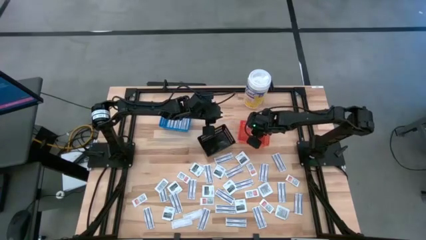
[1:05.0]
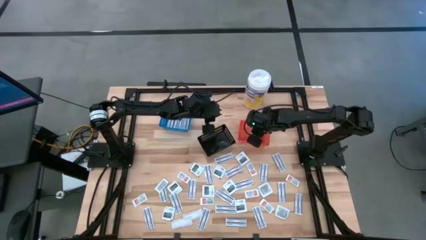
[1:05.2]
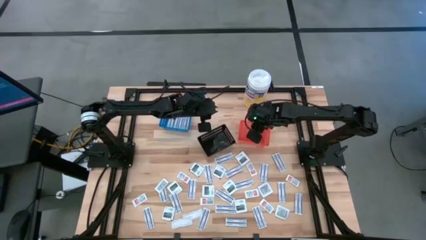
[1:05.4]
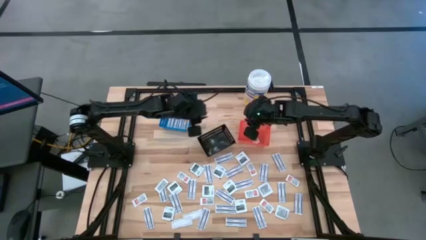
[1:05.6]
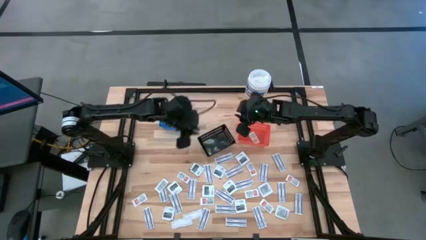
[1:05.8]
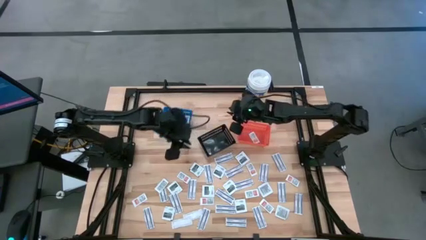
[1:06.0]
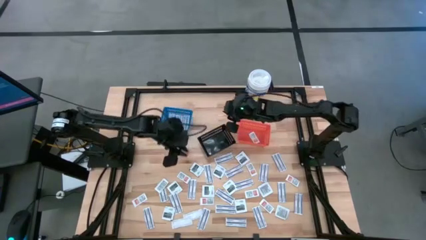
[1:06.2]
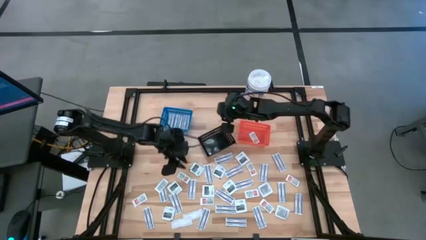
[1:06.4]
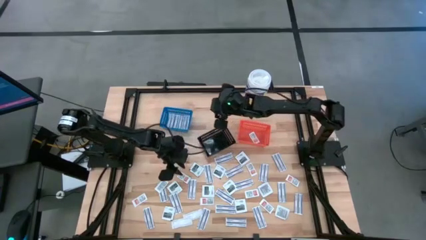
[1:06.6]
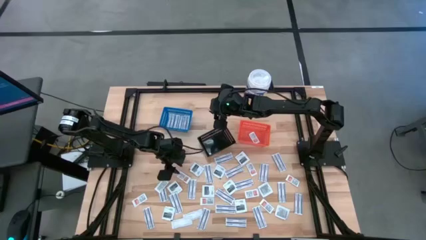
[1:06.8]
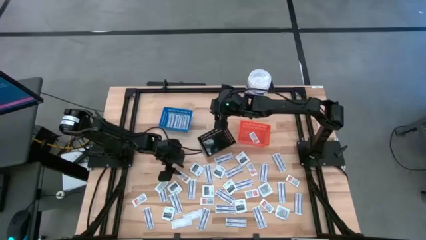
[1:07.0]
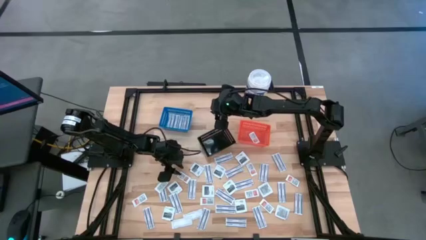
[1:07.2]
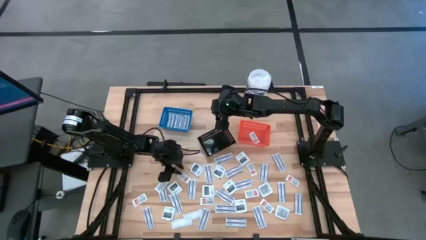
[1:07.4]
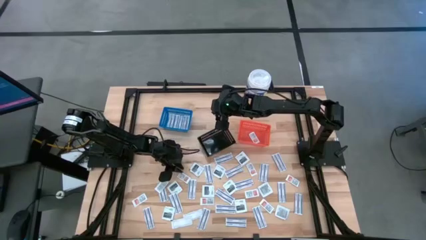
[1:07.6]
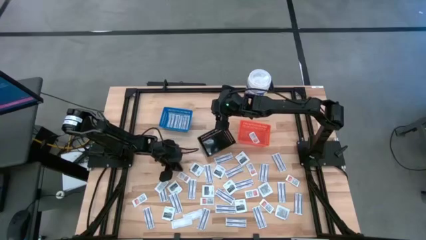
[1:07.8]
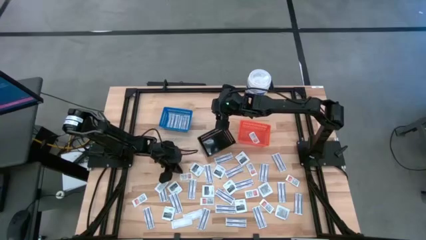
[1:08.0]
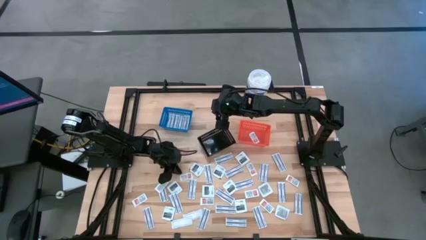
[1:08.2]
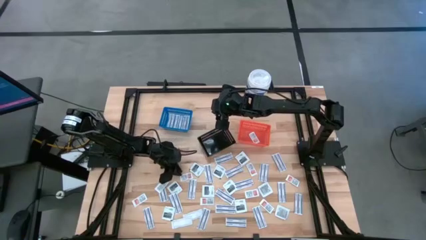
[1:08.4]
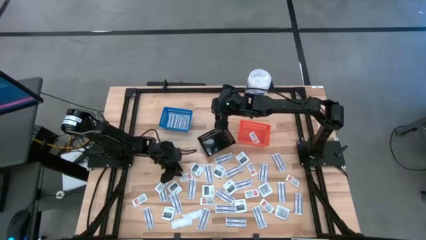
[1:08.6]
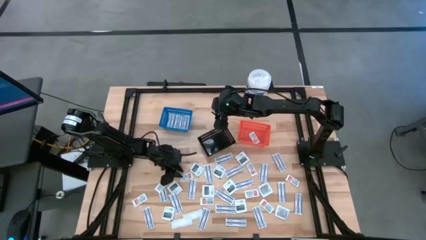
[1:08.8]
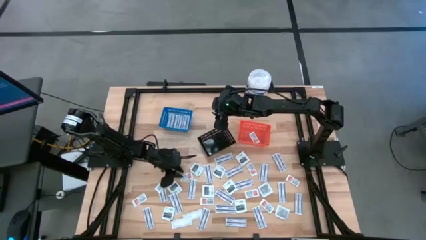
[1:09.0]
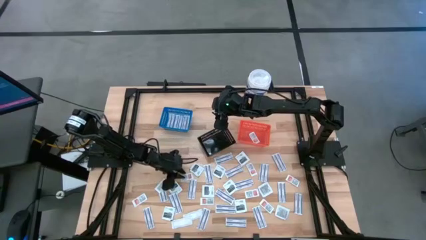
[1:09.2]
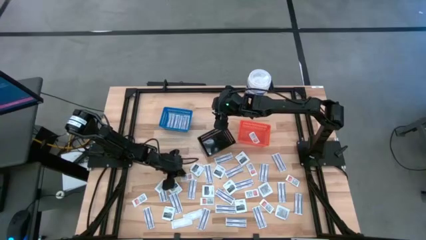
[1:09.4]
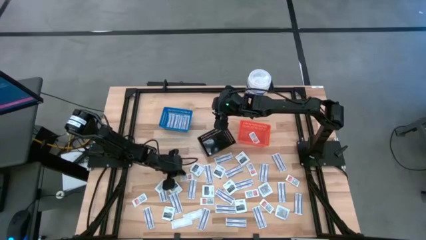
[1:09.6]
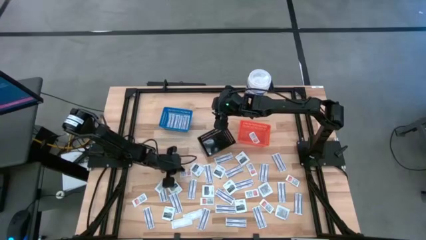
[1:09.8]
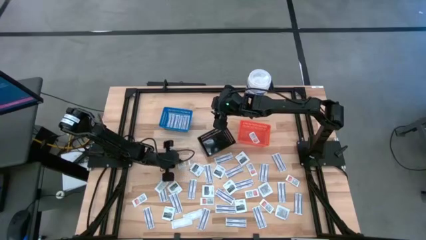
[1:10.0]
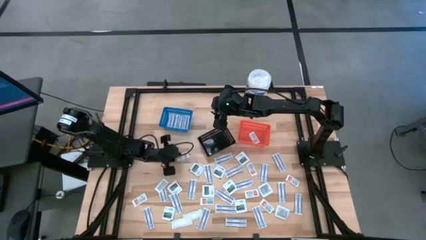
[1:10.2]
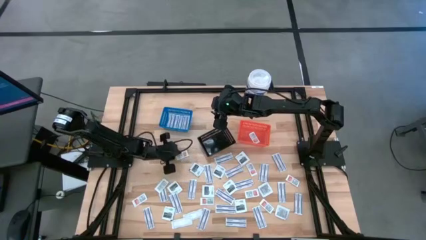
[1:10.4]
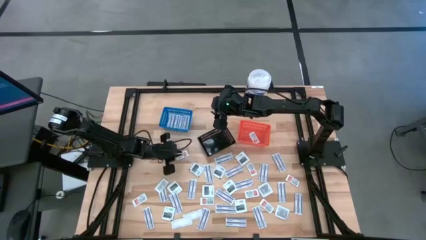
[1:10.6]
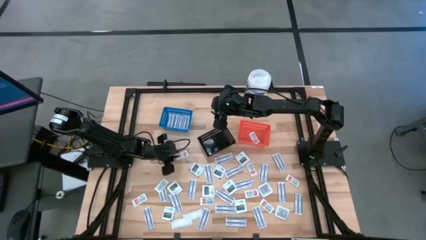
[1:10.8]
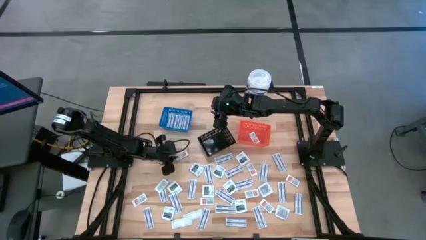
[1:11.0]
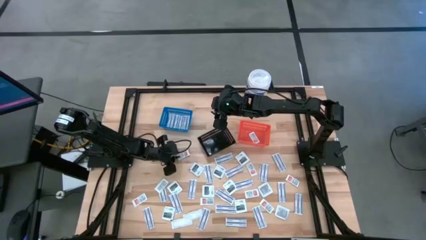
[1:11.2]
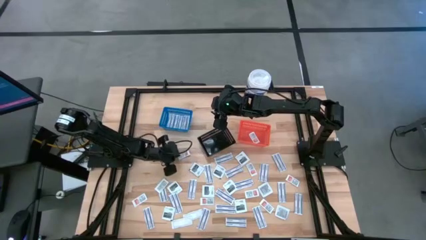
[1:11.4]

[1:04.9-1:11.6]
Task: Pick & Place First Aid Supplies
Put the ointment pack into the orange bin

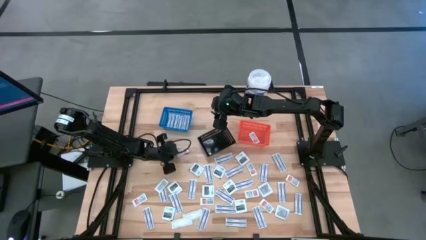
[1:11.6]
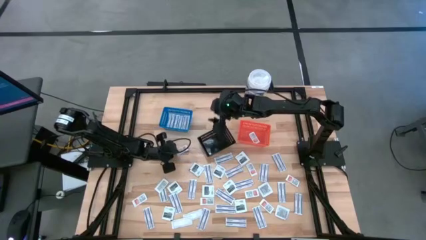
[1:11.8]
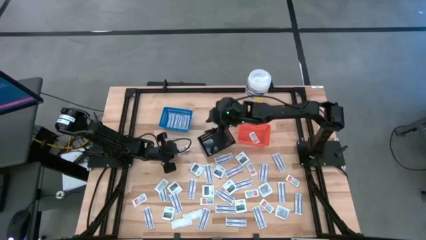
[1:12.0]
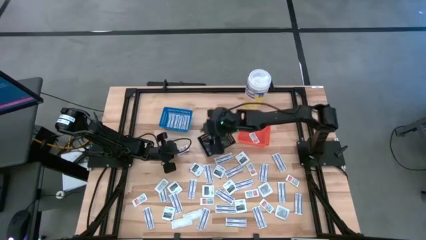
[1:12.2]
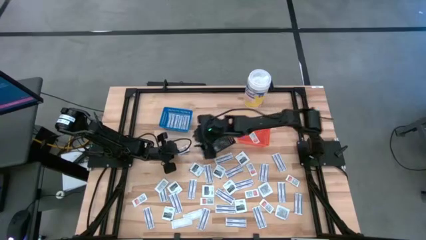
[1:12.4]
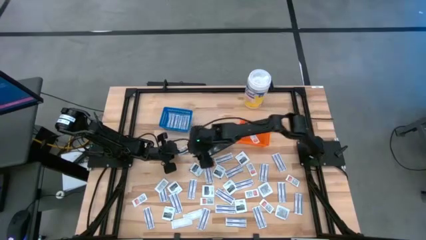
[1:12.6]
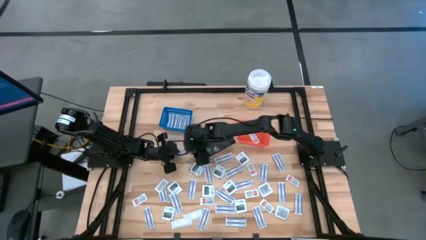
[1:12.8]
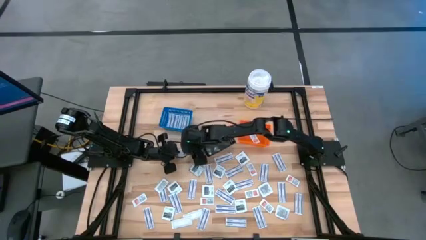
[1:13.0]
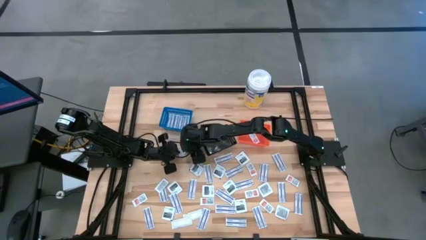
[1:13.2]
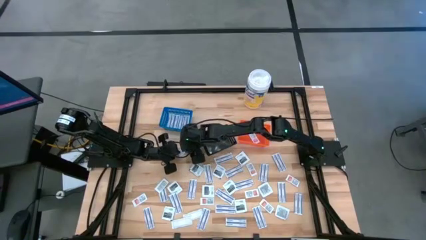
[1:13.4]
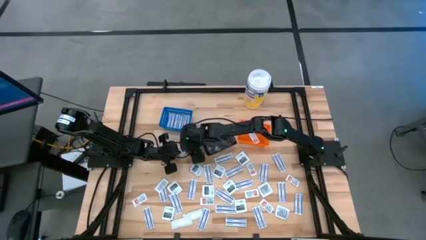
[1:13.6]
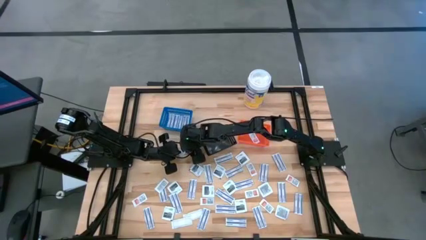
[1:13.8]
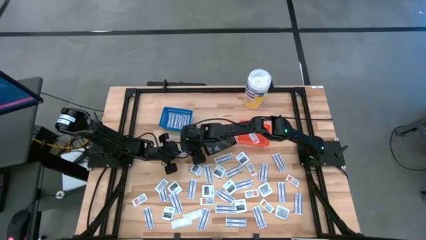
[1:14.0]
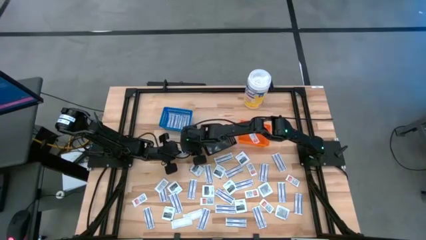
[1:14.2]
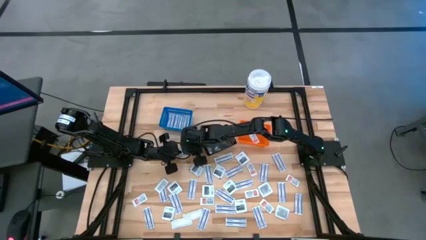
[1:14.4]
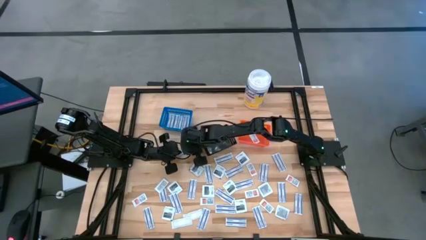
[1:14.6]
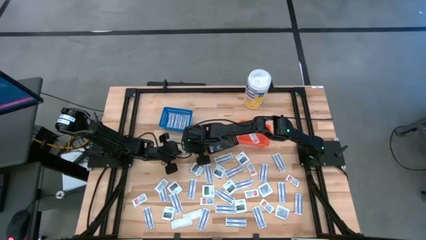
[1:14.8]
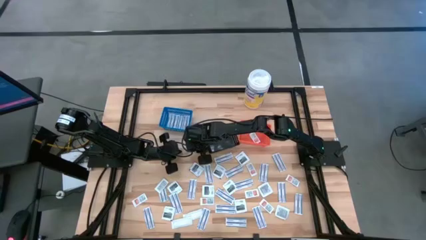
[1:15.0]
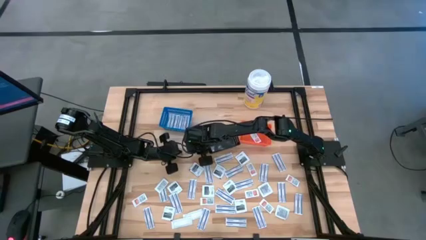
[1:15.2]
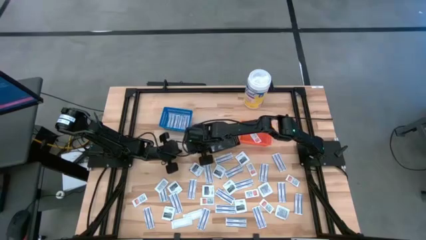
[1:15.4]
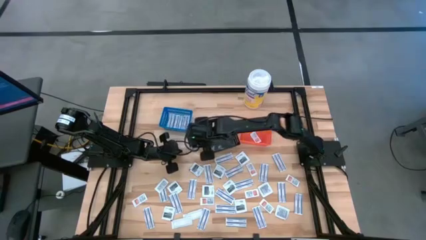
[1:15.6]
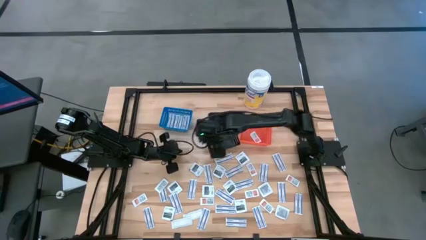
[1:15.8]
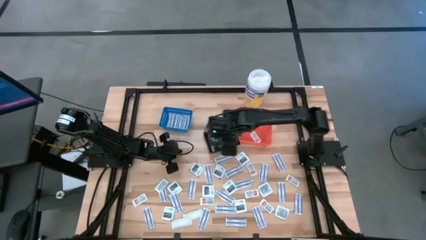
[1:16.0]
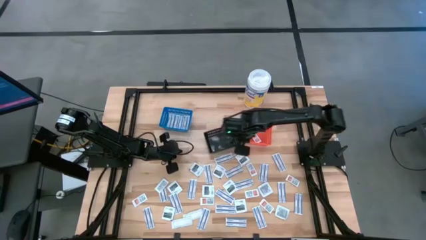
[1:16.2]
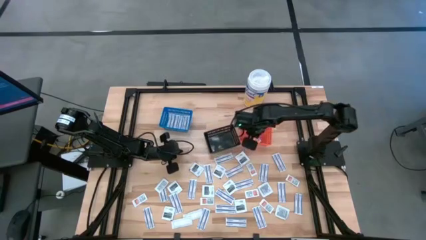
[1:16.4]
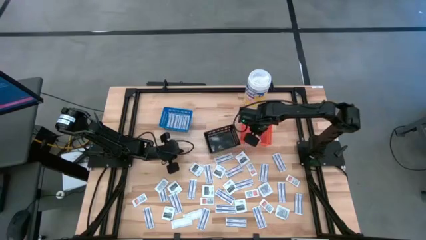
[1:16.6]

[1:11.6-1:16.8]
Put the ointment pack into the orange bin

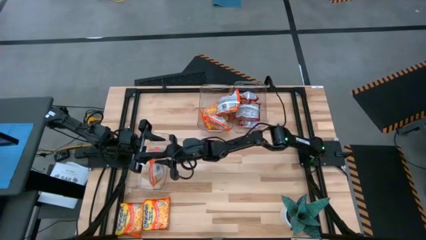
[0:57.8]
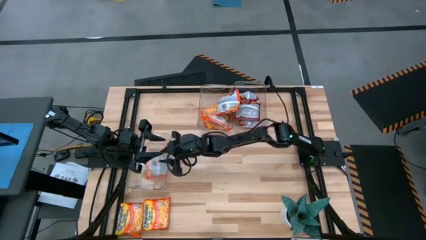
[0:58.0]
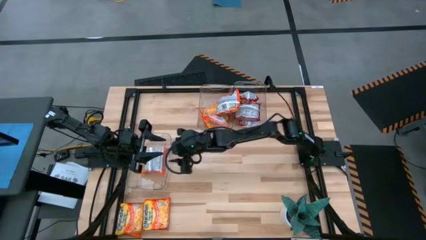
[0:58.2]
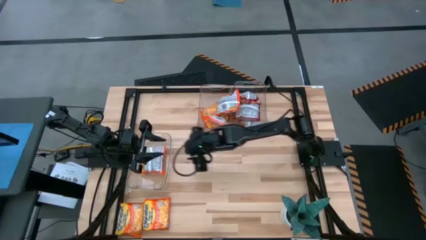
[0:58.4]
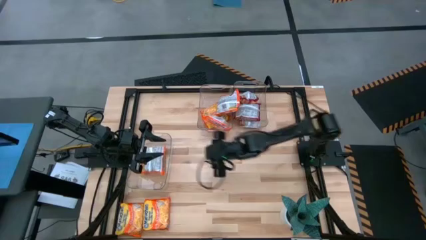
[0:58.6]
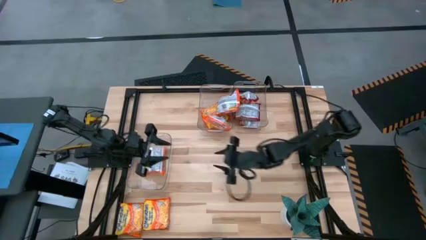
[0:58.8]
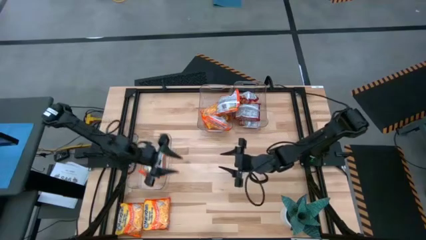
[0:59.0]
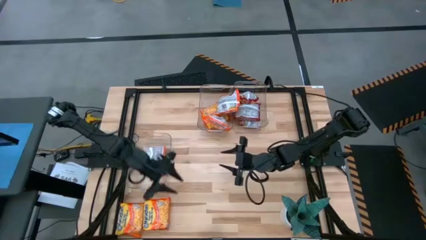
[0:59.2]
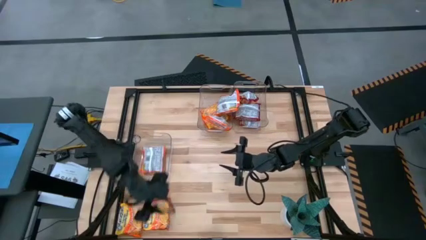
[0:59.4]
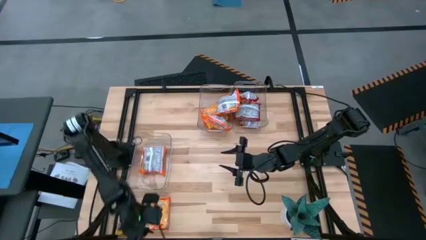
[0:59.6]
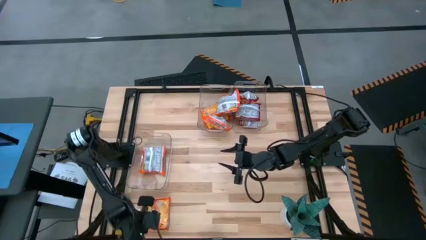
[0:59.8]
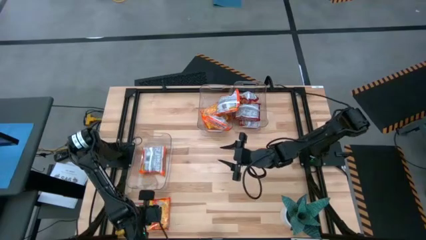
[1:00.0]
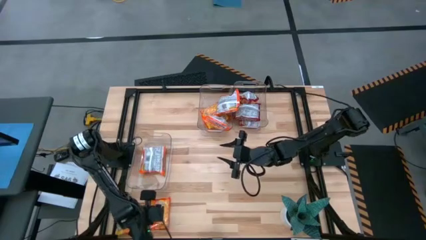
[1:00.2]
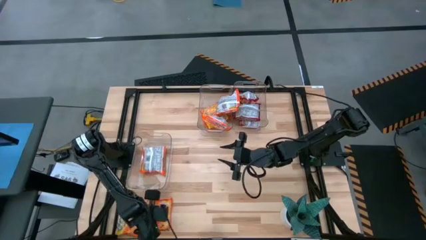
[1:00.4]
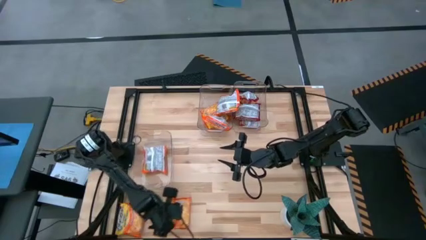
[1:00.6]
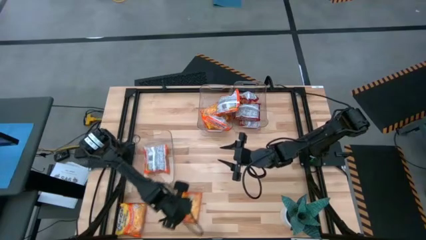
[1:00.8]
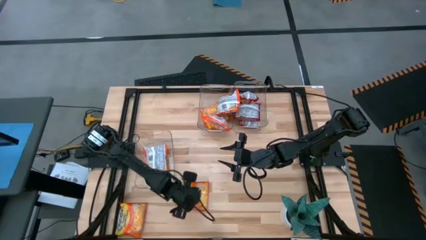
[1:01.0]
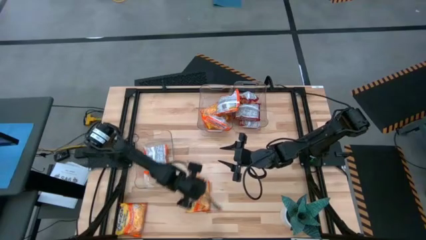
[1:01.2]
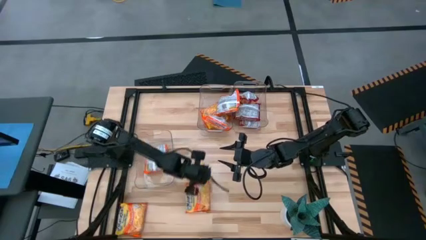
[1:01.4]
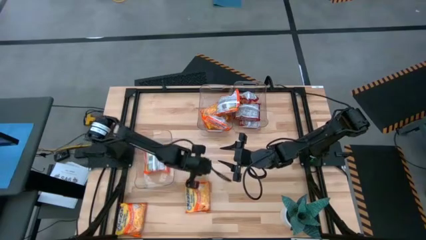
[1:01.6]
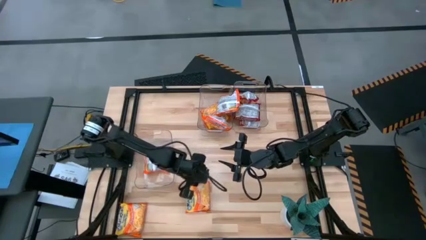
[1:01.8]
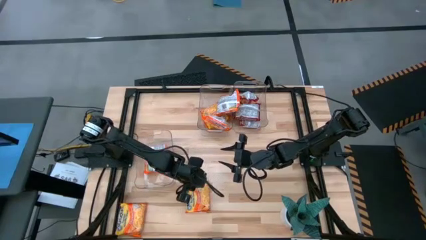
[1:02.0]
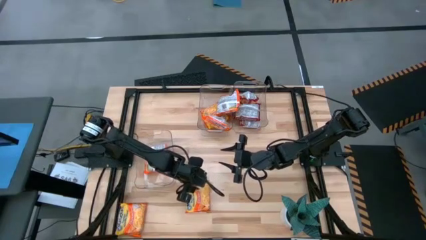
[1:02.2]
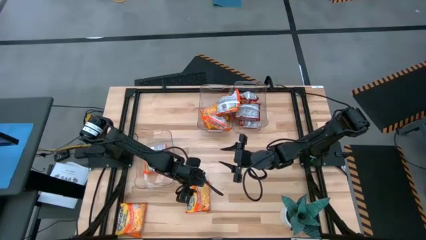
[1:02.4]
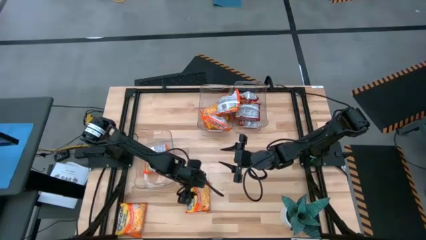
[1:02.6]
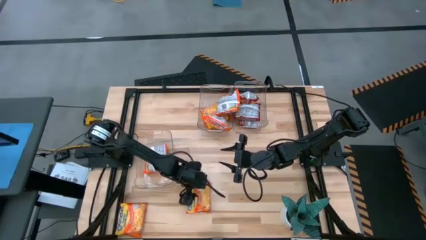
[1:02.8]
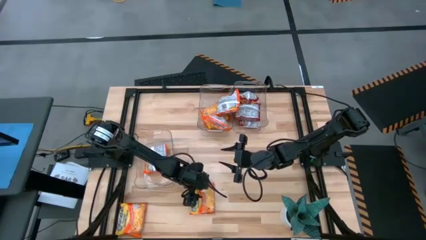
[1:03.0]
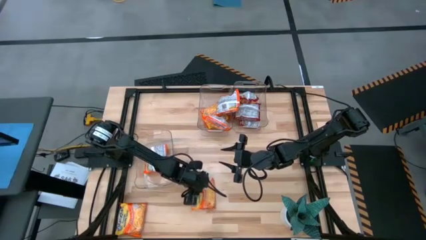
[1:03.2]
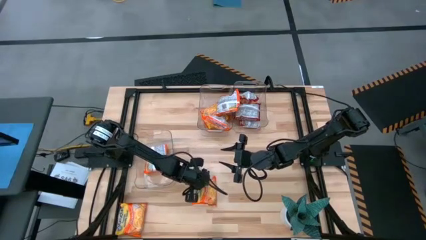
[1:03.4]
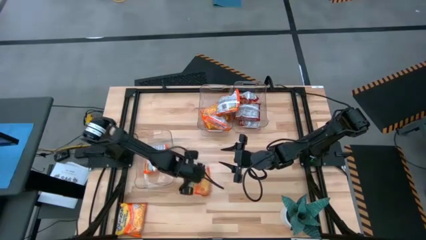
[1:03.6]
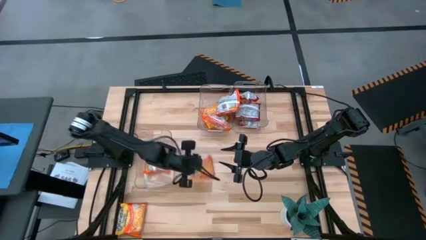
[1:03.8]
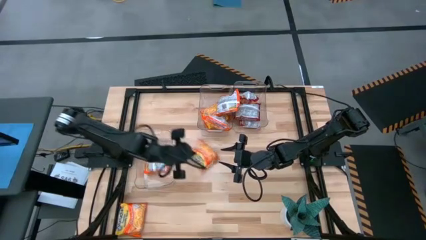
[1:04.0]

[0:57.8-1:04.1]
Task: Sort Maruchan noodles
Put the orange noodle pack into the bottom left transparent bin
